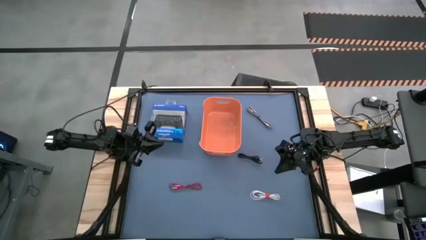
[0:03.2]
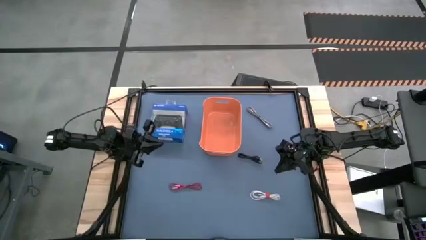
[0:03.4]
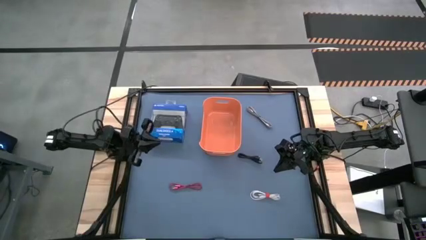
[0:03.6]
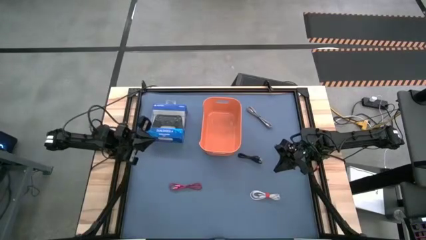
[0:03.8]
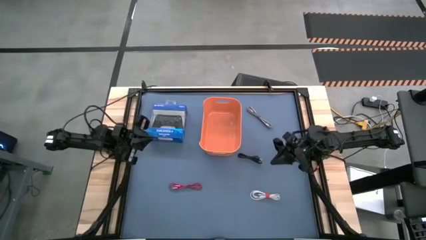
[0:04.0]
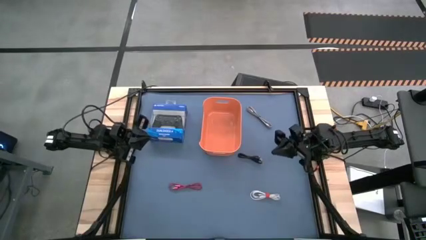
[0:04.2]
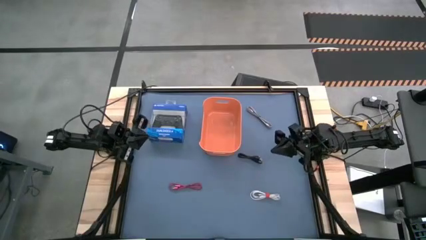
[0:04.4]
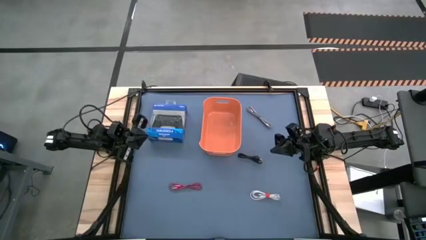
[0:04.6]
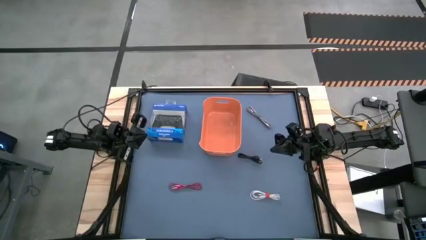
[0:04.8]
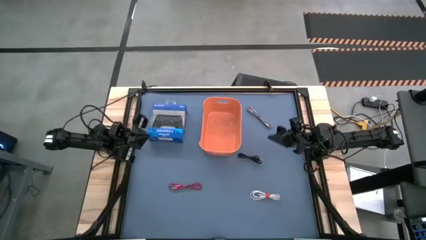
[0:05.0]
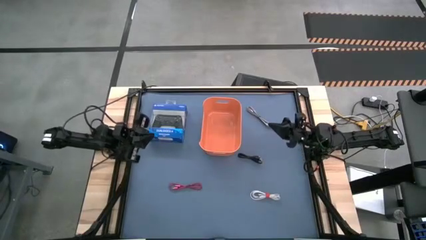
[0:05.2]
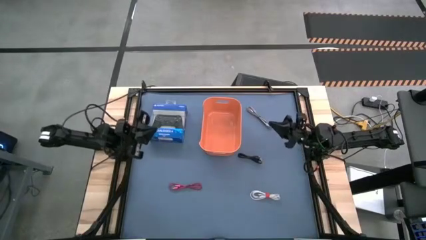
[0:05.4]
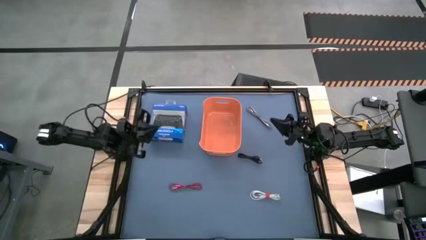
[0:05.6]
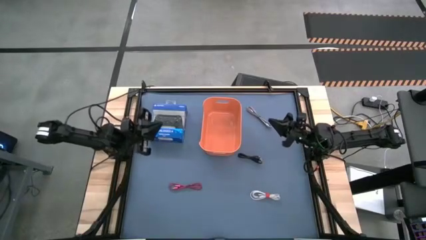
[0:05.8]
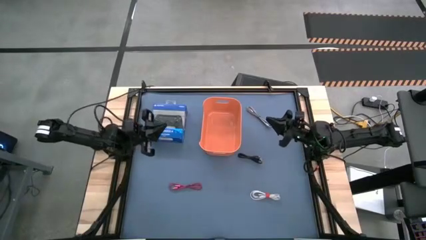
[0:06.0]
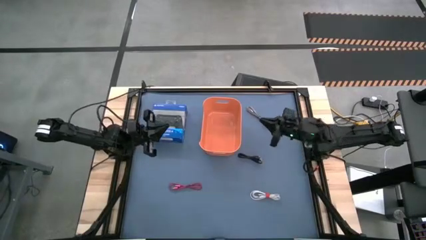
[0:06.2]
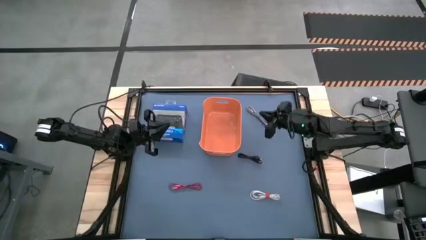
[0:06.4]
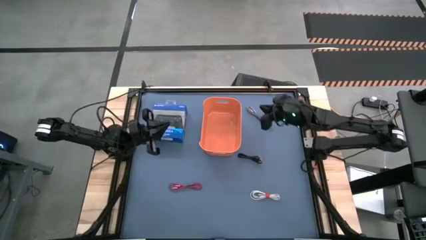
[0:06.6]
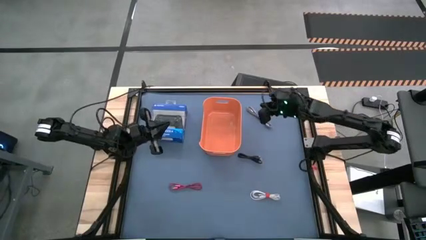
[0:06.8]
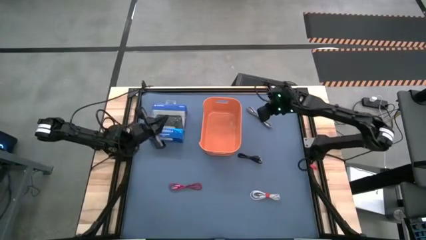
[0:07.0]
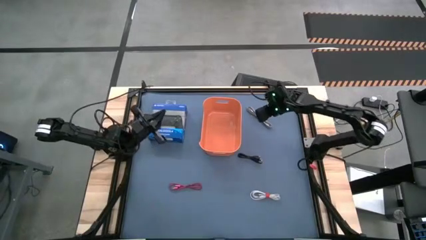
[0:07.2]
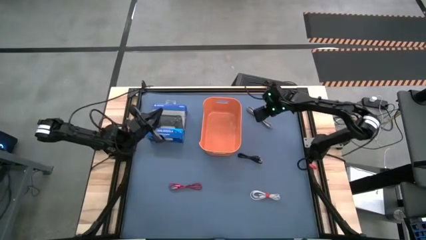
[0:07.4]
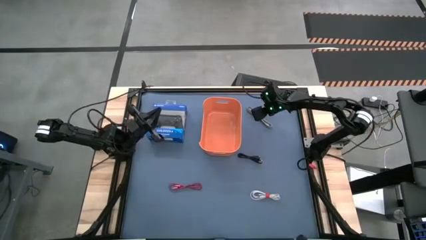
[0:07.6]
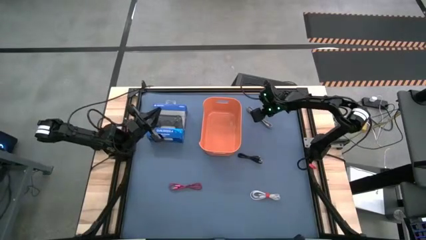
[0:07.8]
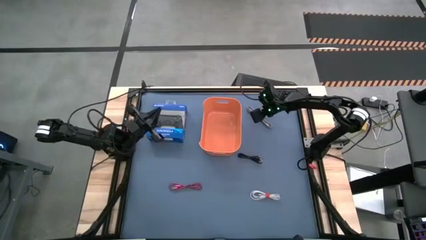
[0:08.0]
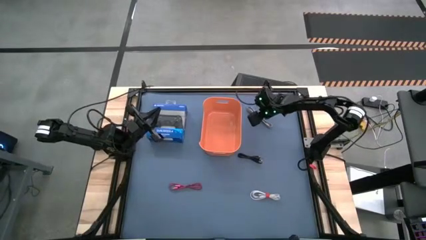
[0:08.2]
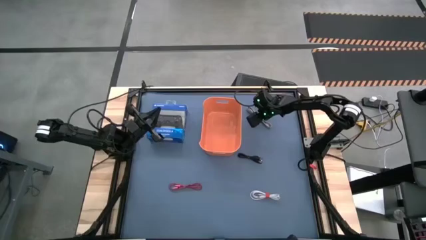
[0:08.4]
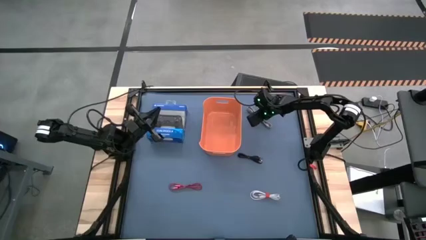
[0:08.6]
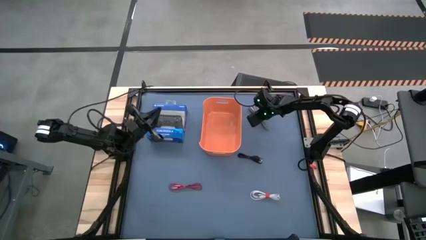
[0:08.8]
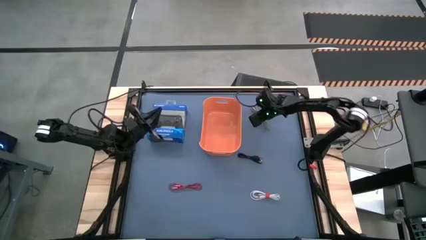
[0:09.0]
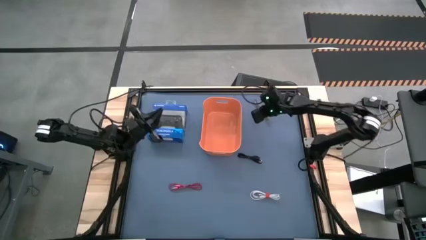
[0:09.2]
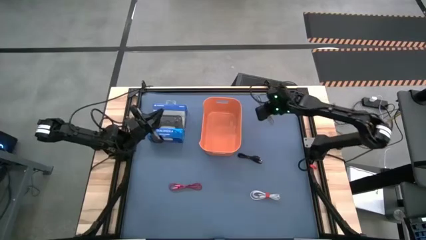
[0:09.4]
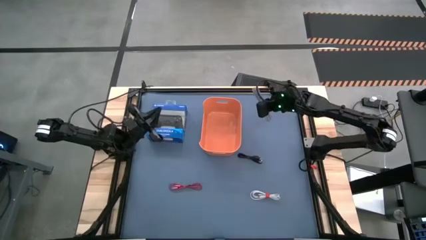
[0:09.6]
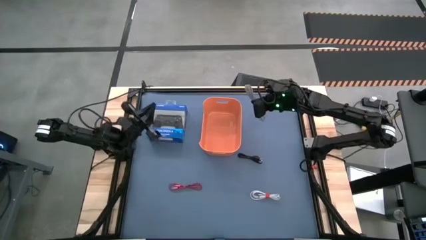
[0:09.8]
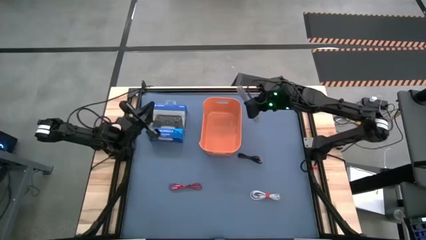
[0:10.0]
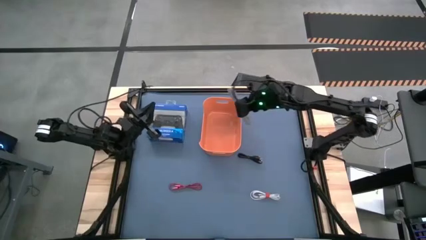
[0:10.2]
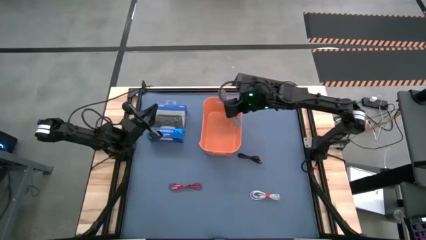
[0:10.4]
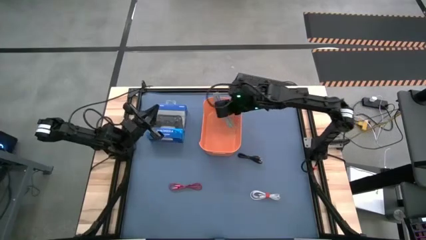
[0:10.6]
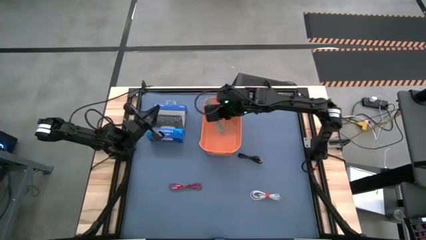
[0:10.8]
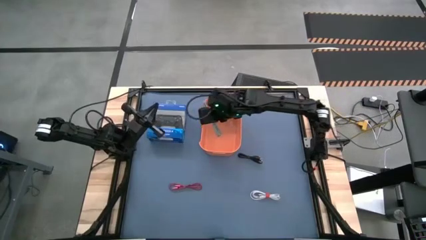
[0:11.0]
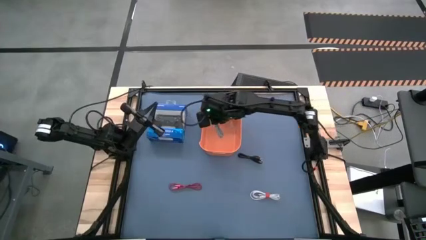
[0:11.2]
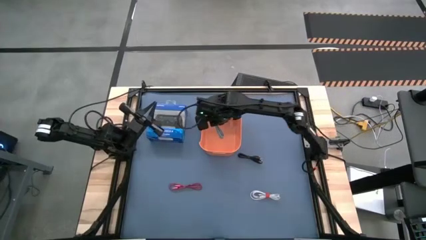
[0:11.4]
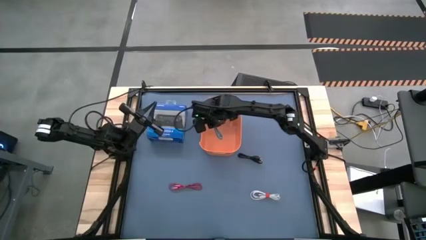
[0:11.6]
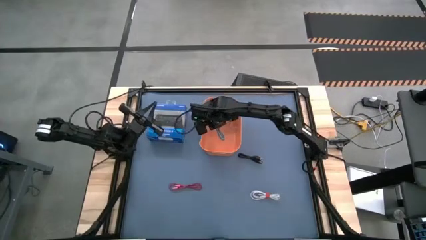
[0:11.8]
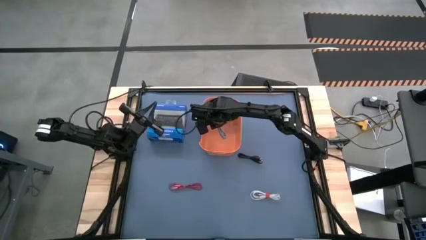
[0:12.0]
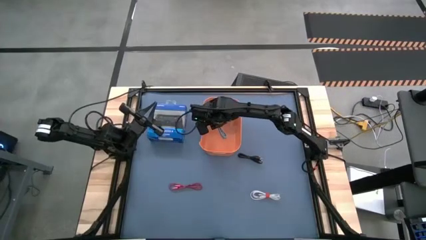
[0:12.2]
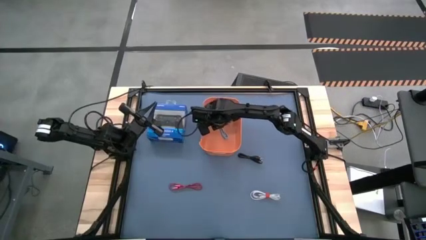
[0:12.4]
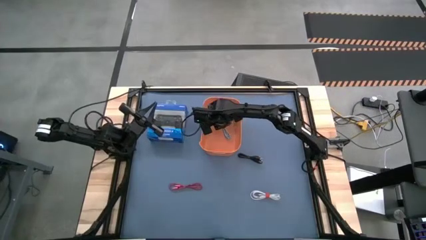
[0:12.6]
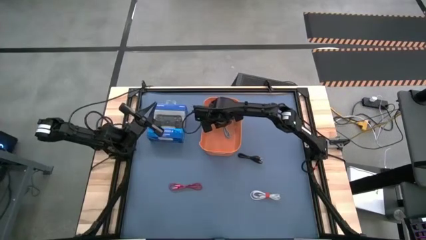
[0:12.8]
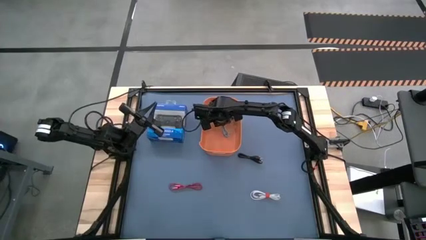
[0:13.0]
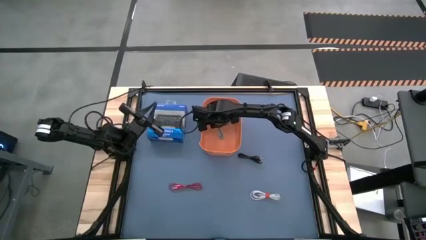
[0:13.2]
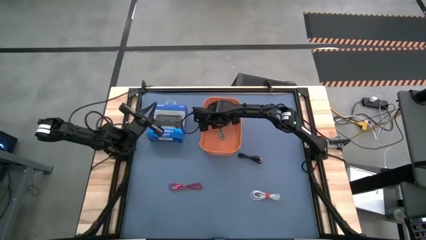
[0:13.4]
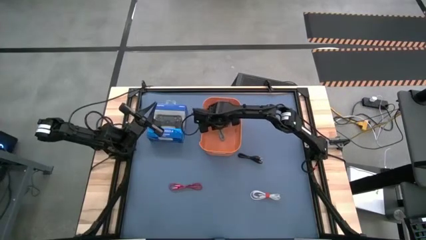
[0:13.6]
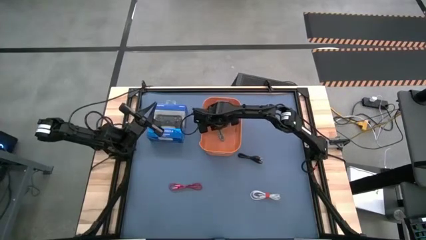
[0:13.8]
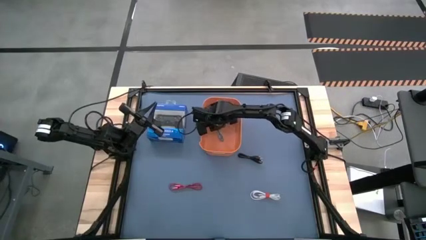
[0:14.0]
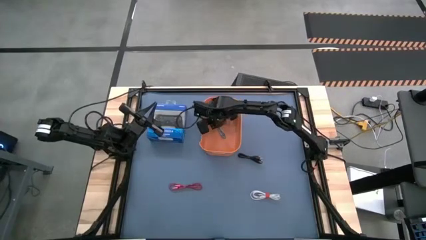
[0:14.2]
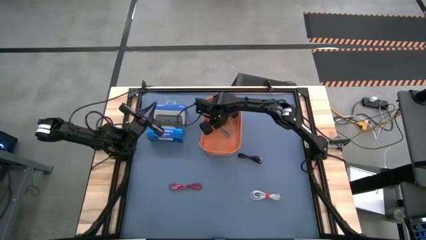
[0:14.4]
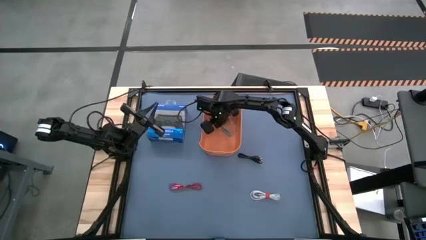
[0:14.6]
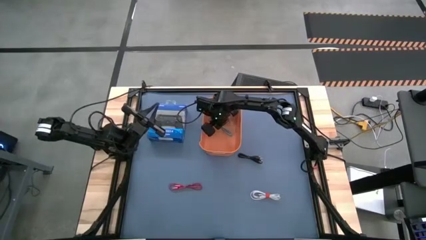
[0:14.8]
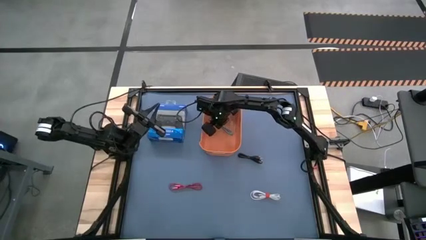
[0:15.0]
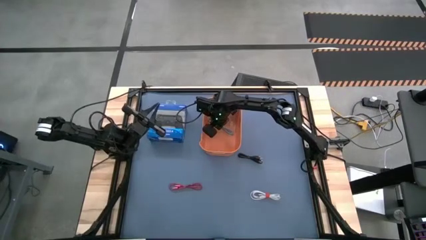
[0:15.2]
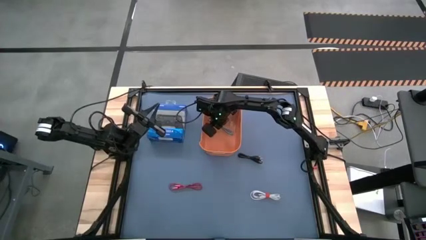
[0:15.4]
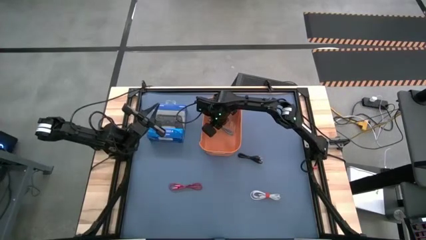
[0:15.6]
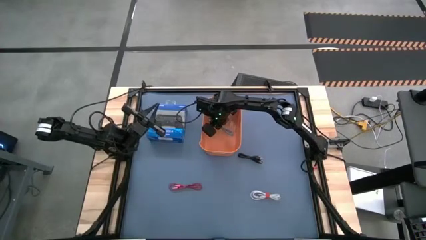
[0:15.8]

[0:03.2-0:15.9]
Task: Pick and place USB-C Cables
Put the white patterned charger cable into the orange bin
